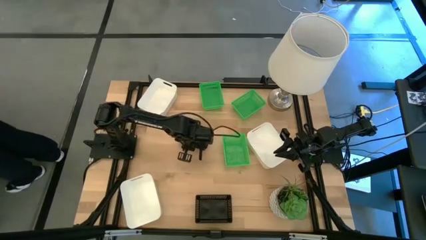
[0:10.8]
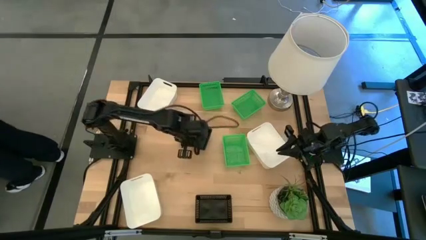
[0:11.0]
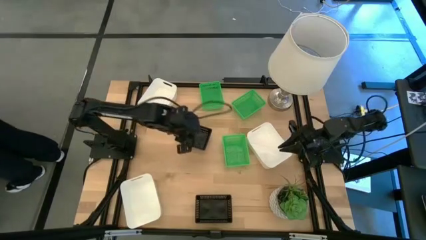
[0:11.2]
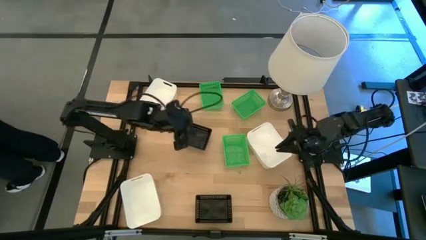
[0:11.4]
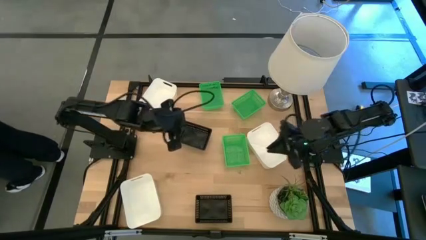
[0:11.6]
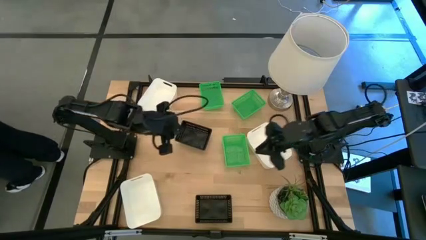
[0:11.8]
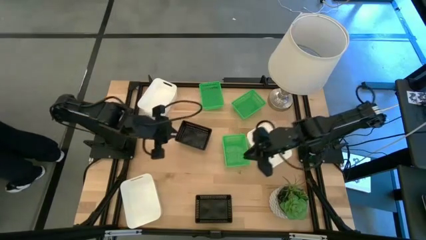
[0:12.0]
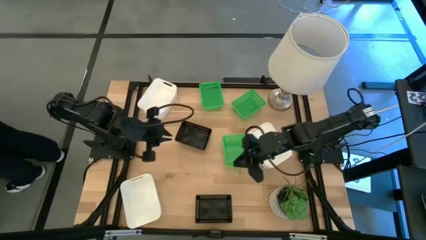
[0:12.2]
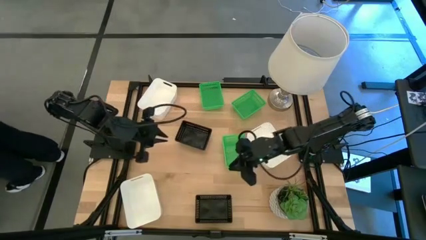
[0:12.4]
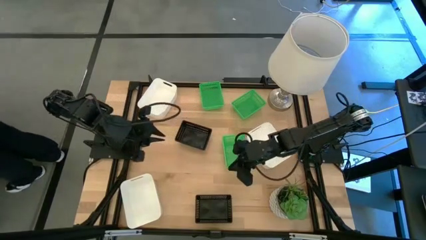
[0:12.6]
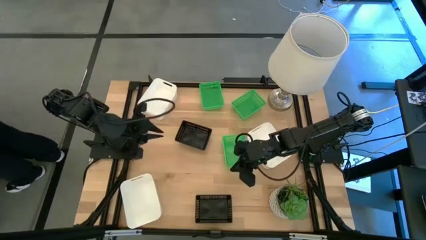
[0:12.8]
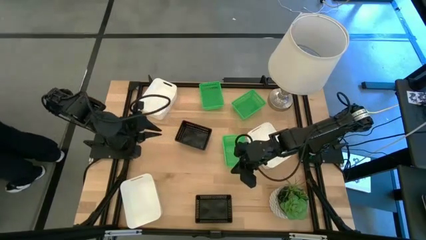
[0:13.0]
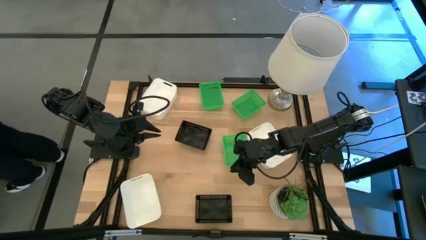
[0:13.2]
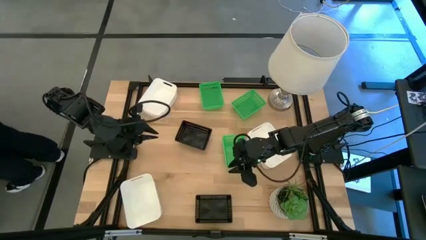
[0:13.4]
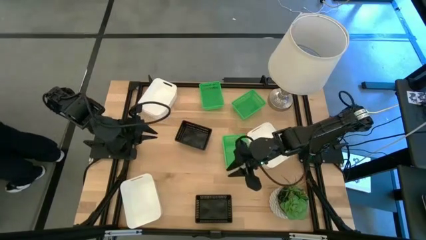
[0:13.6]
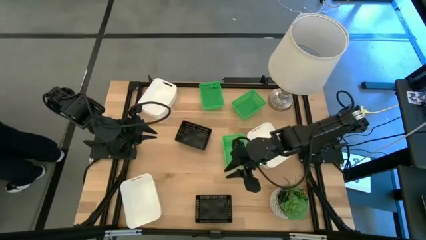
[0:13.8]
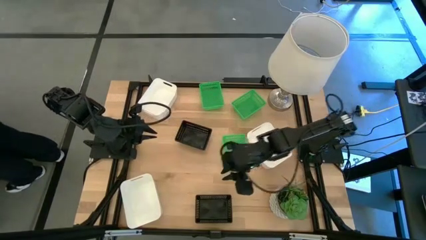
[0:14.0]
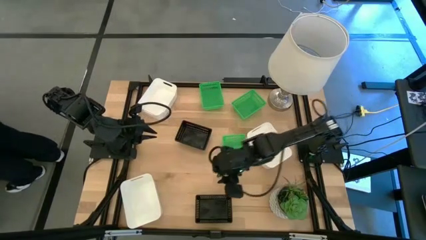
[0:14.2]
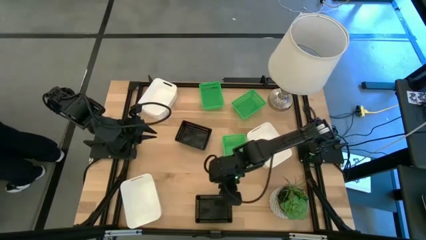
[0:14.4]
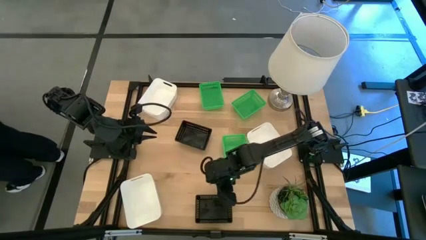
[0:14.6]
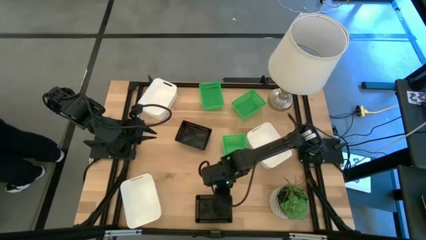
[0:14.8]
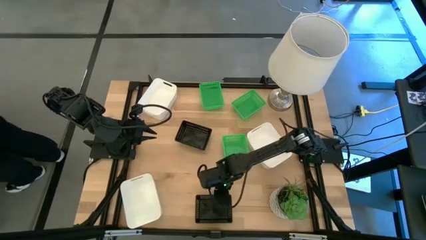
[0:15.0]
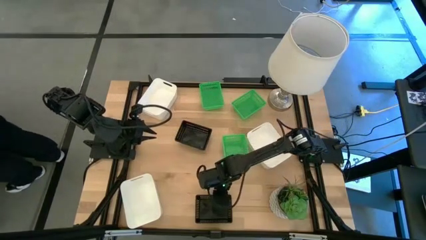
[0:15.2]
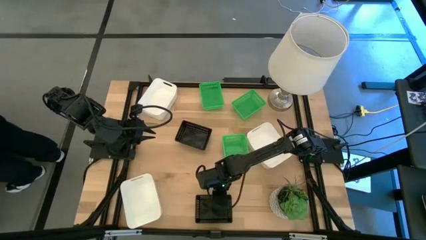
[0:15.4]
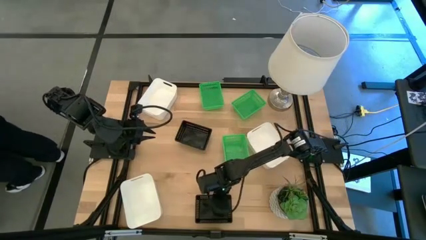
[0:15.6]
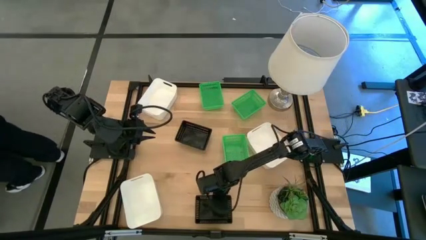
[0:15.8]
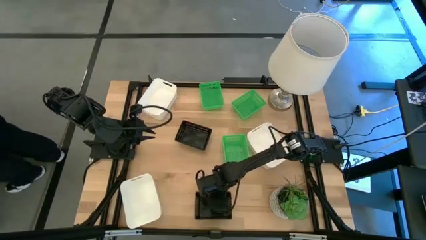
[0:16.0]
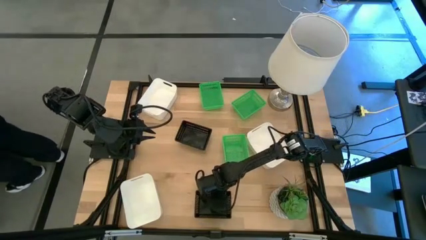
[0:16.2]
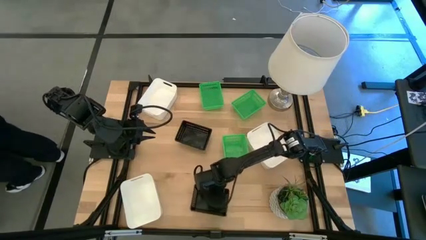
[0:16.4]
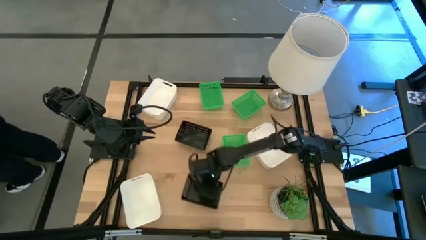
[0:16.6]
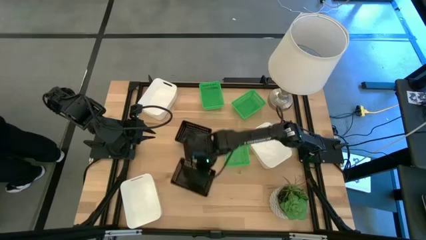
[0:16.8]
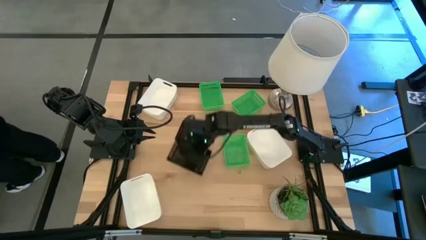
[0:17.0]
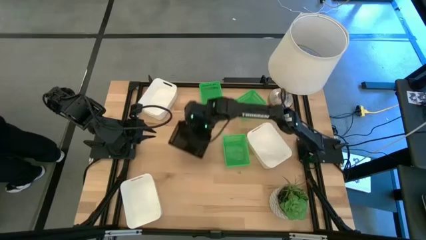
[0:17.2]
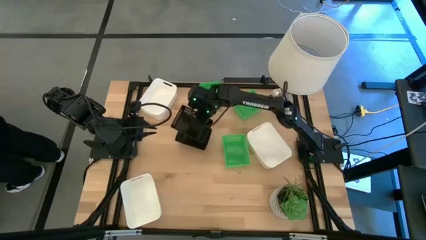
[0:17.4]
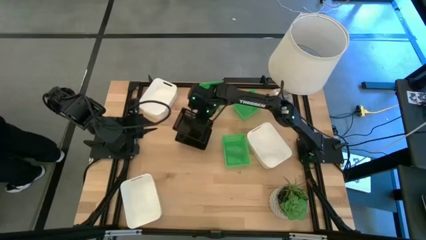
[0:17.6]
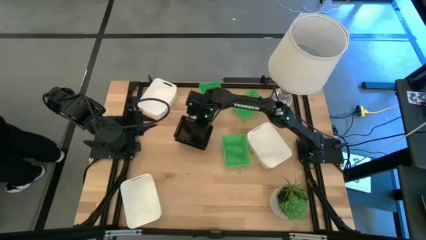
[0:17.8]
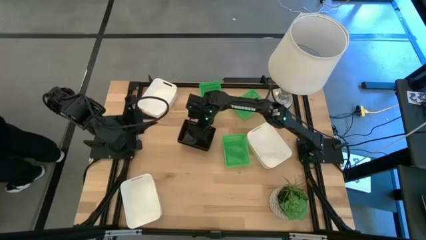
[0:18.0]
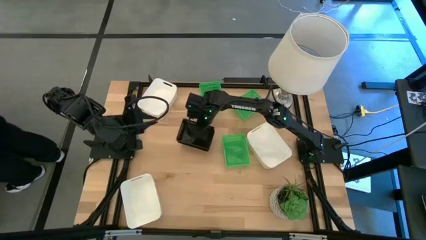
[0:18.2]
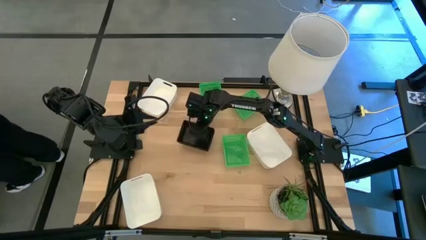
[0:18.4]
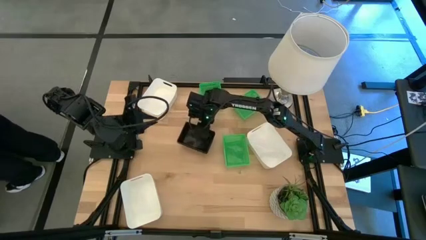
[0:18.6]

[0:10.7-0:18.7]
Stack the bottom black bin on the top black bins

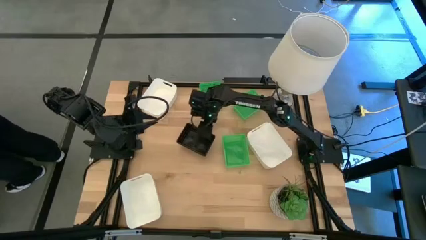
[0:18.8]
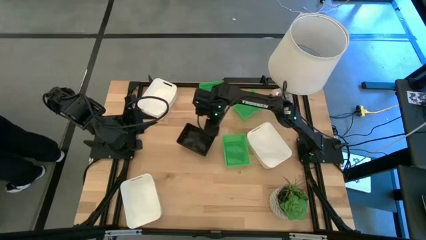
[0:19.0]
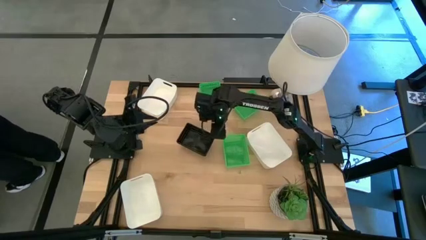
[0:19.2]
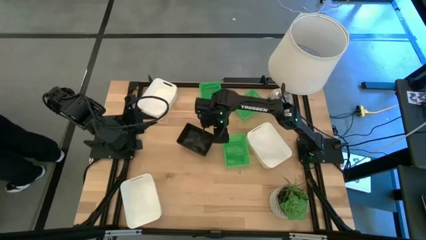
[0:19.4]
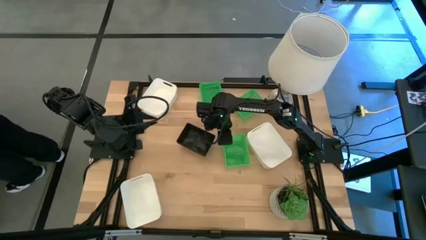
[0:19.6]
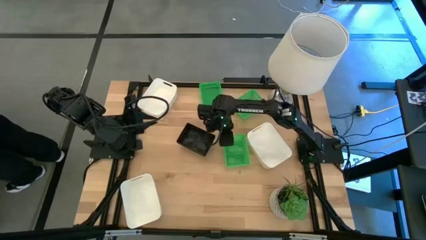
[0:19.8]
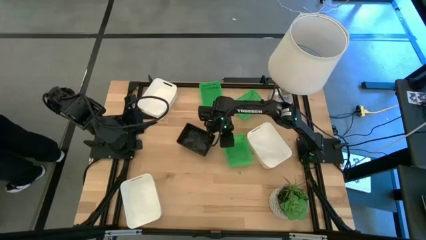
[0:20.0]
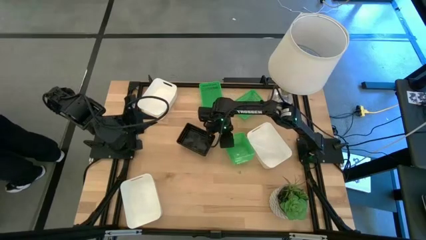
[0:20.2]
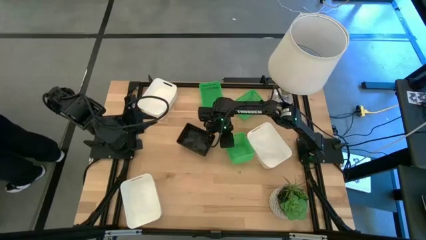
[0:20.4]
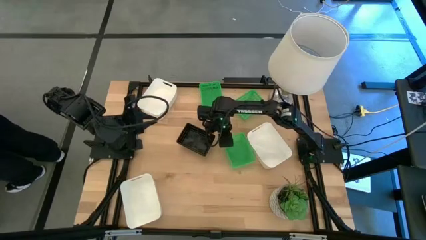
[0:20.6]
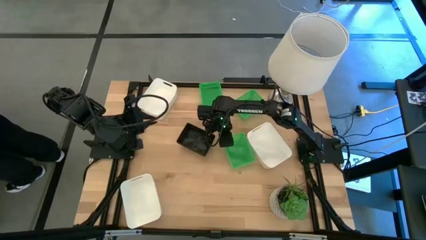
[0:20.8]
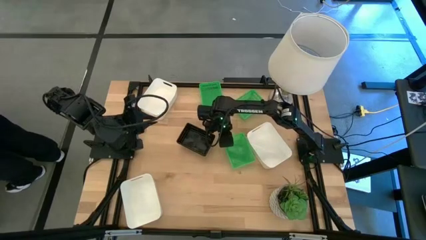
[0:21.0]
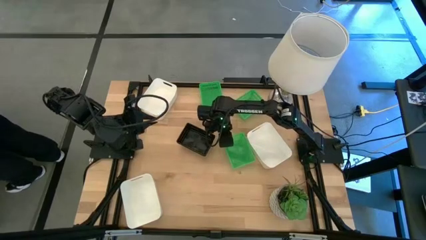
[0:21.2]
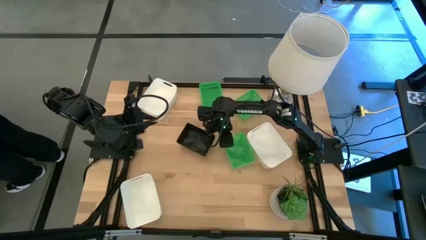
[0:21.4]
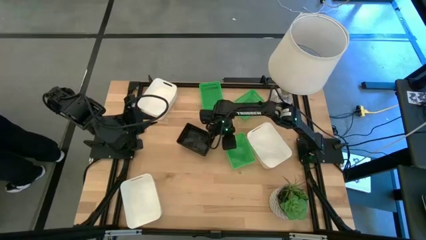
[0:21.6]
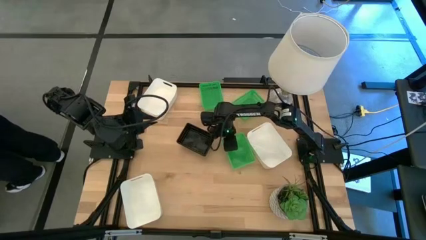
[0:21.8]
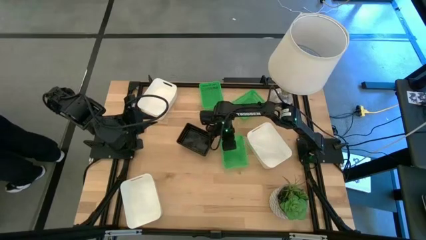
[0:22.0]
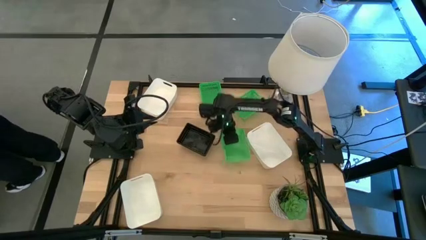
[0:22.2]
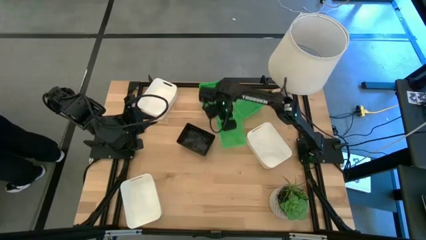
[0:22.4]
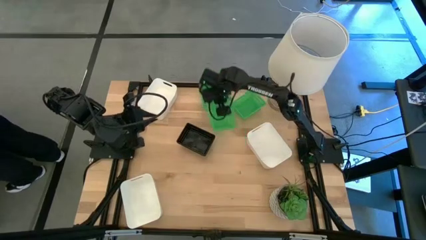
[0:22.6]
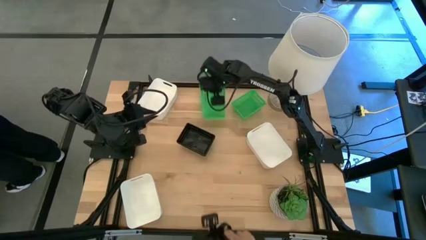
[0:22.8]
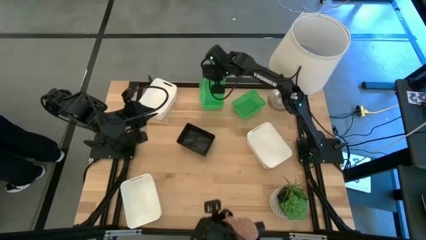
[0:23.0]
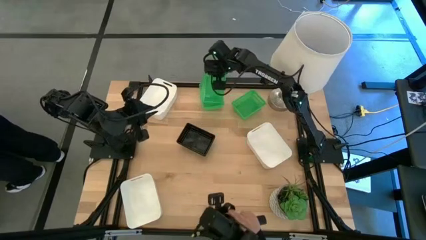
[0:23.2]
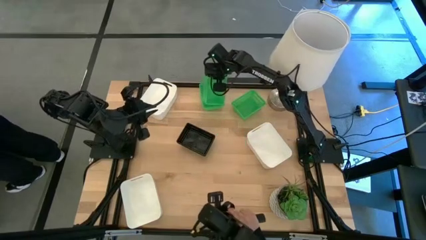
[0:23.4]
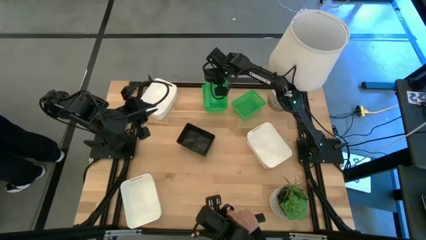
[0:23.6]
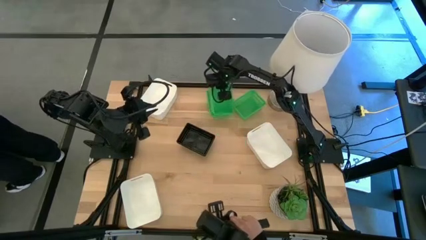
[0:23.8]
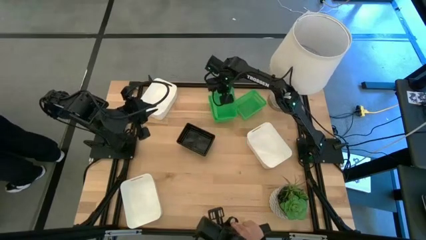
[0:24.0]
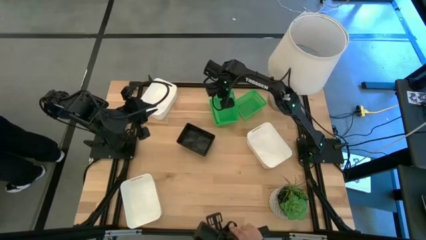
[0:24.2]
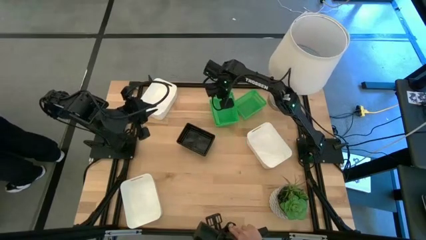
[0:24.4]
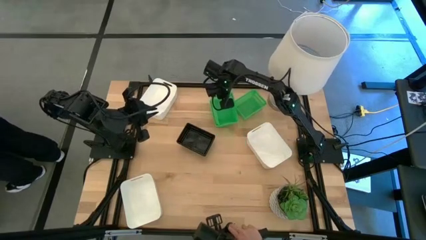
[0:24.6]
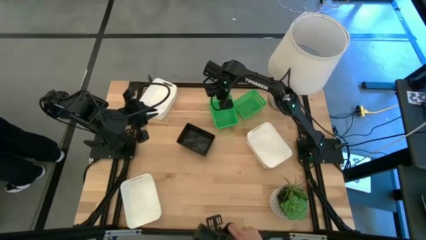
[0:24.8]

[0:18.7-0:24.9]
Stack the bottom green bin on the top left green bin
